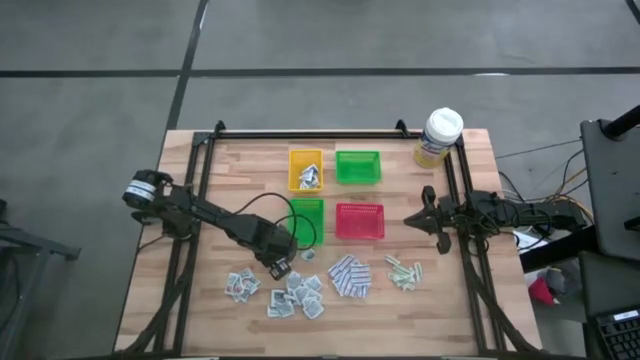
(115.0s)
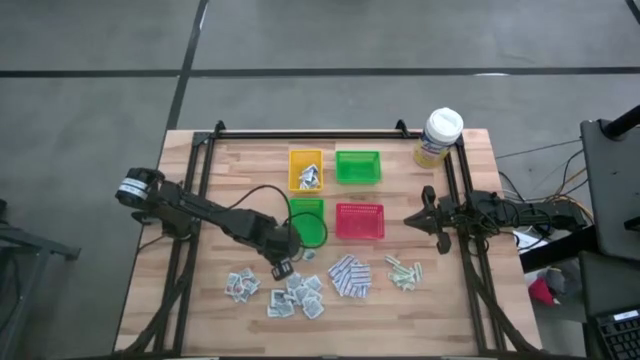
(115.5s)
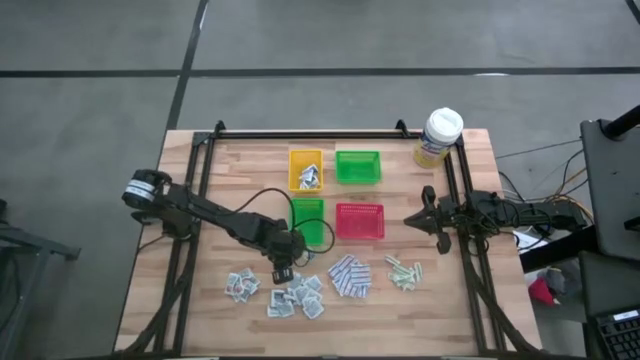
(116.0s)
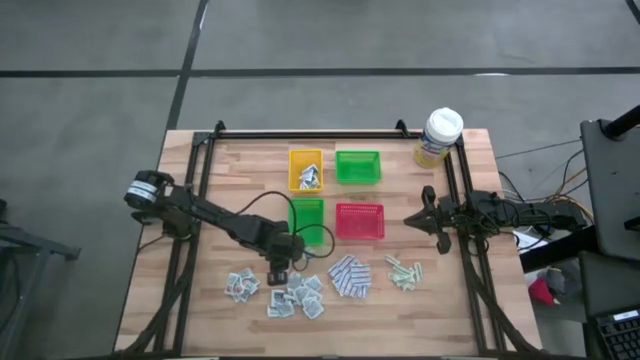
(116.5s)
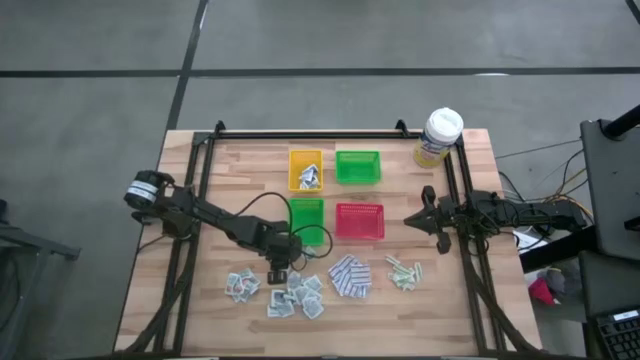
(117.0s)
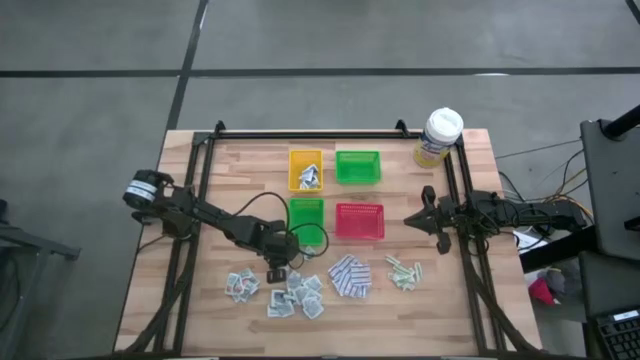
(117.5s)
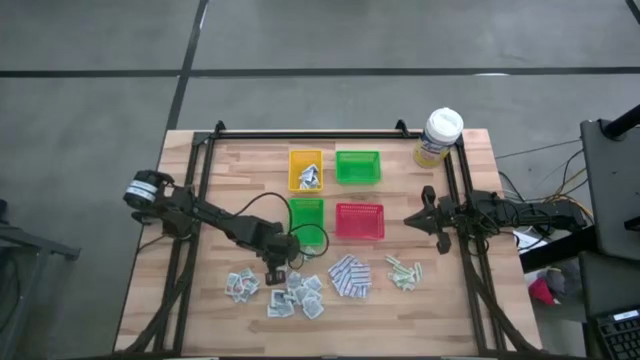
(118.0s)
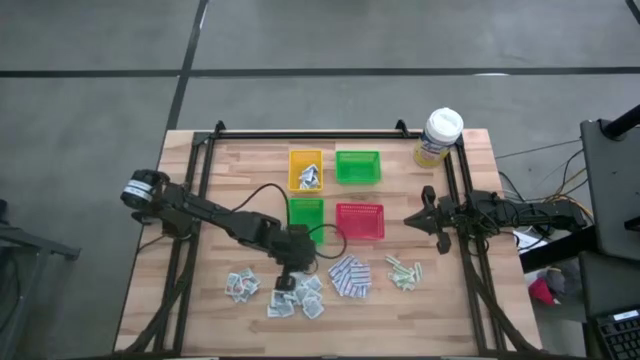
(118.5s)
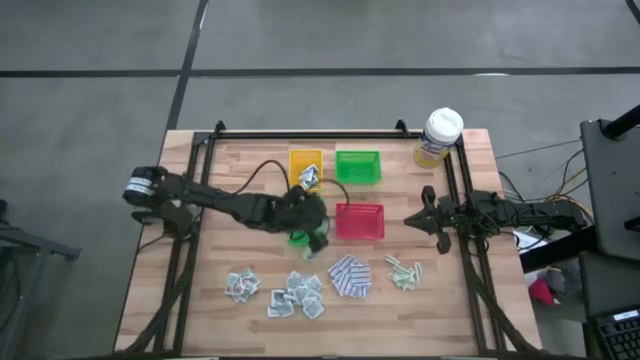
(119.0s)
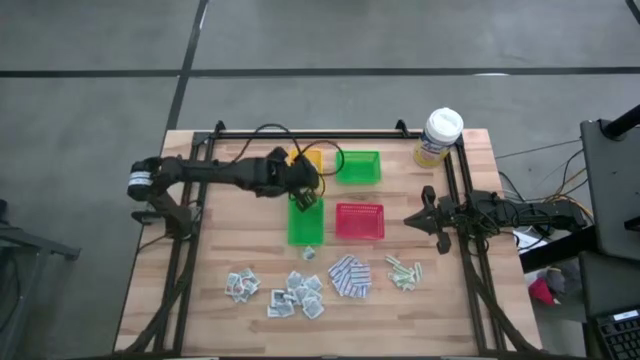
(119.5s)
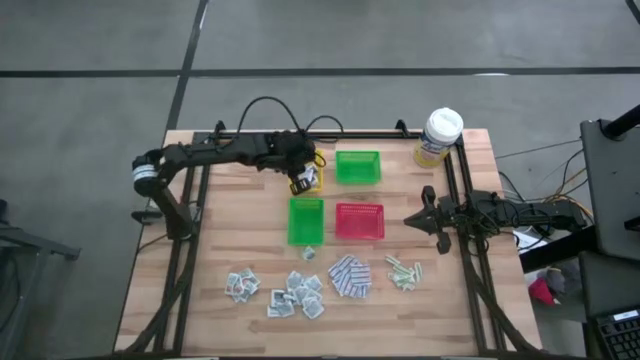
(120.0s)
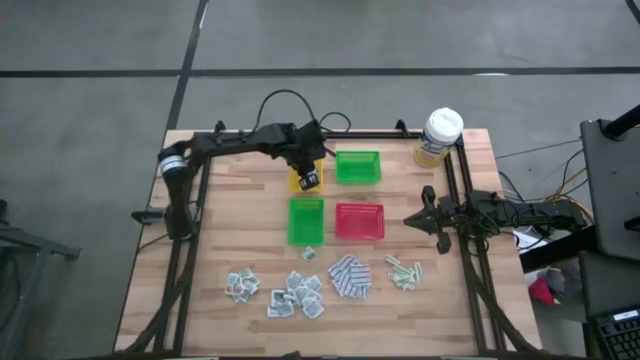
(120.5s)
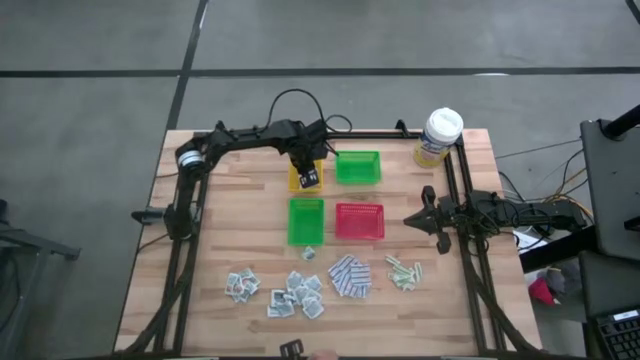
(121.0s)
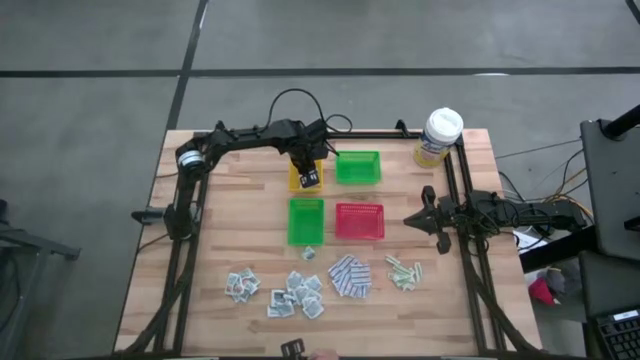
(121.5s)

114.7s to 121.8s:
Task: Pick & Place First Aid Supplies
Put the blue alcohol pad into the yellow bin

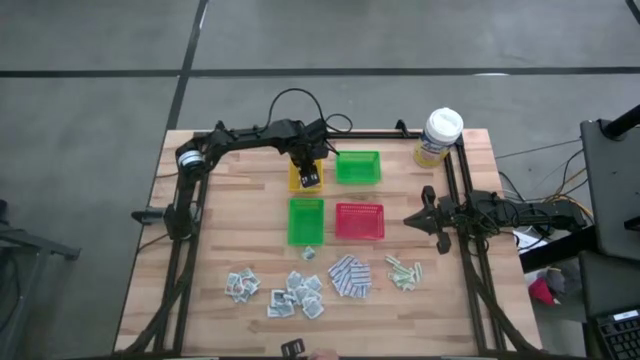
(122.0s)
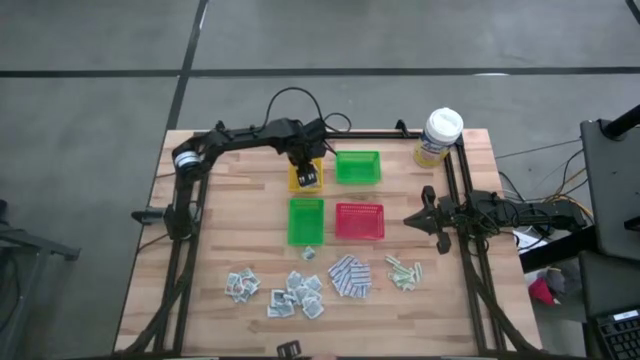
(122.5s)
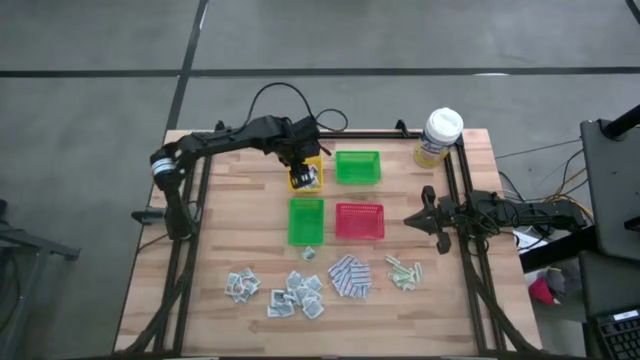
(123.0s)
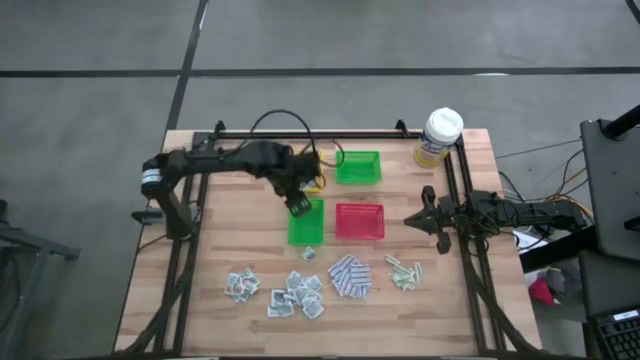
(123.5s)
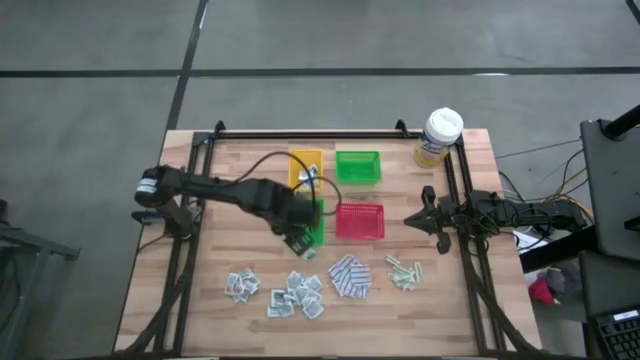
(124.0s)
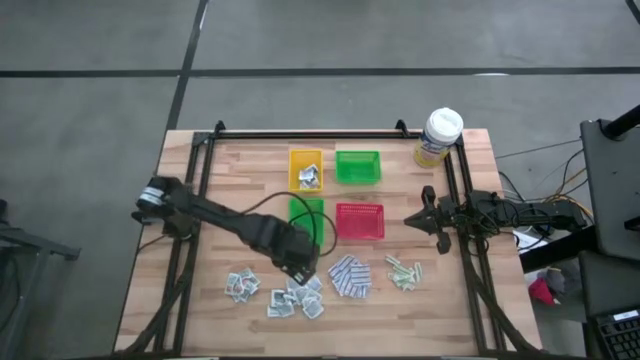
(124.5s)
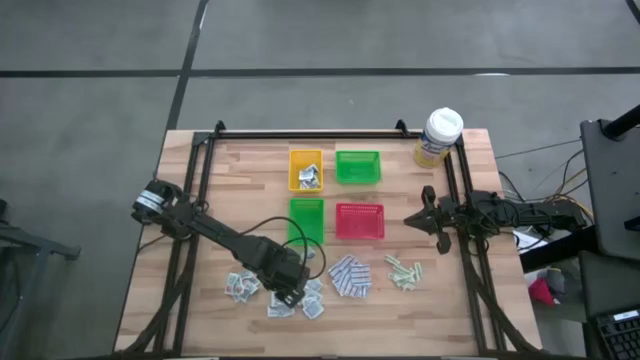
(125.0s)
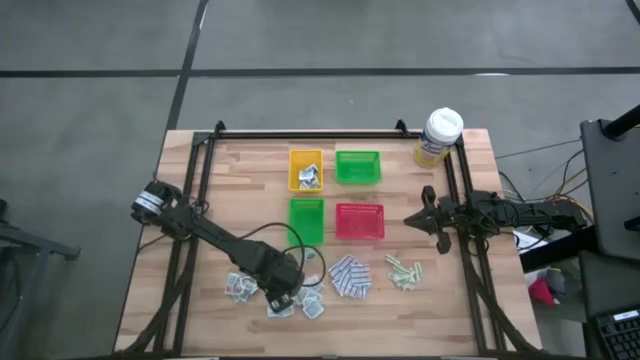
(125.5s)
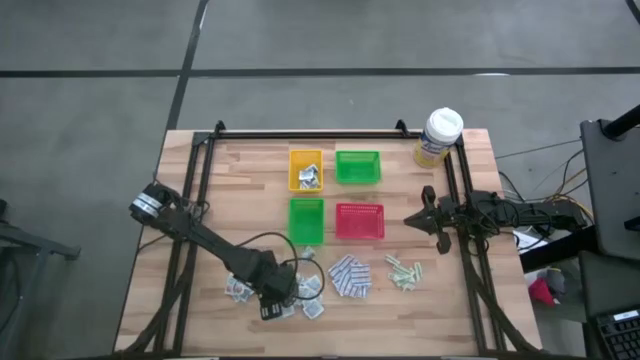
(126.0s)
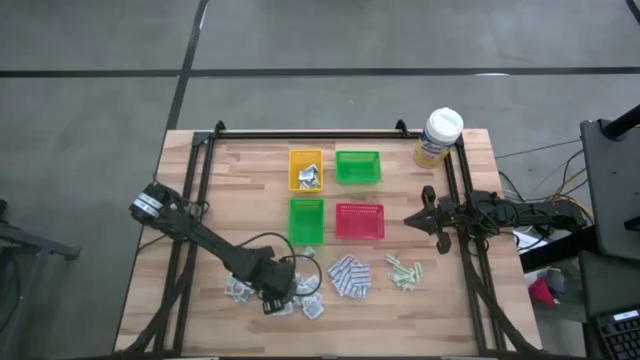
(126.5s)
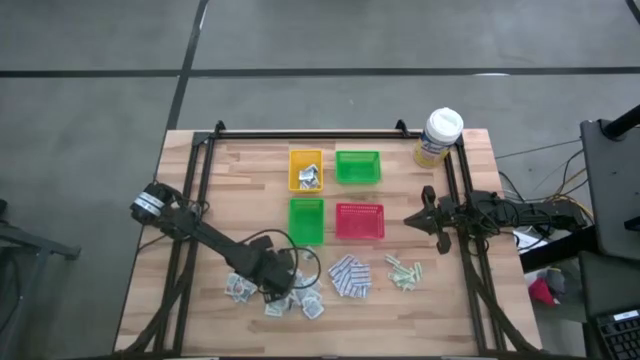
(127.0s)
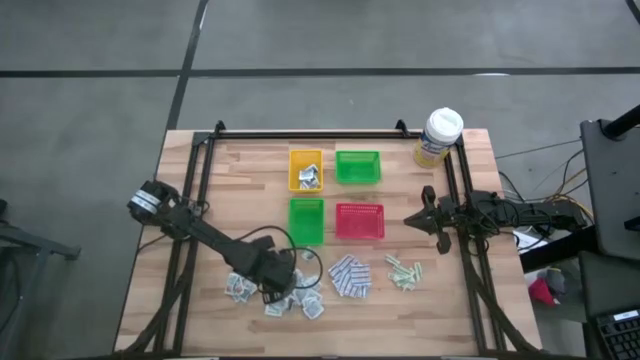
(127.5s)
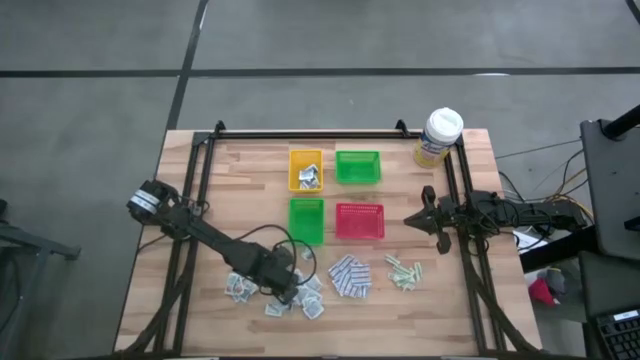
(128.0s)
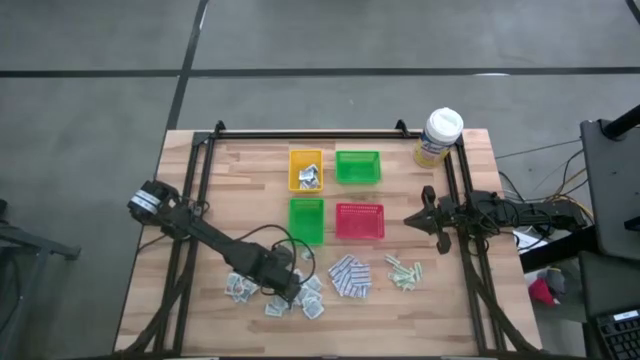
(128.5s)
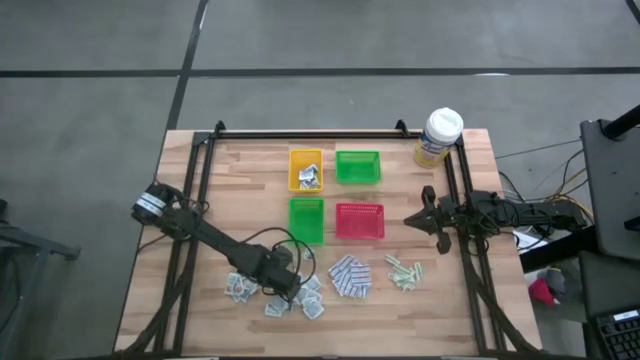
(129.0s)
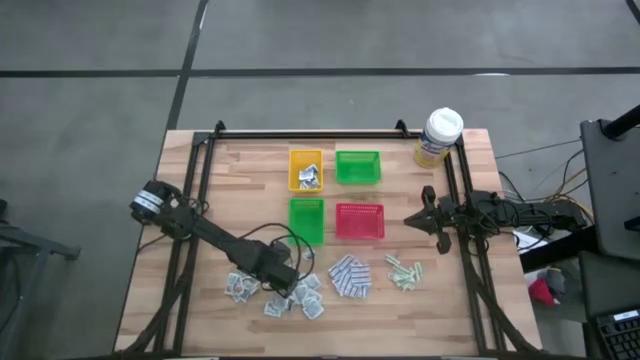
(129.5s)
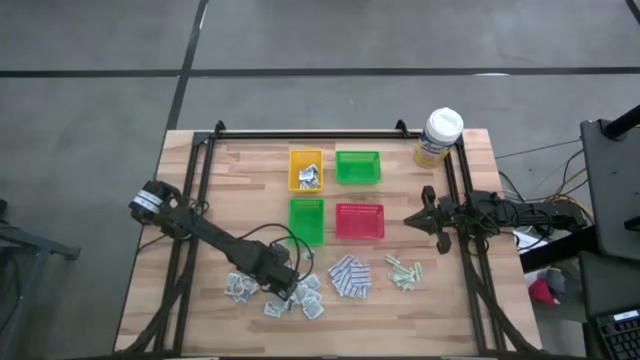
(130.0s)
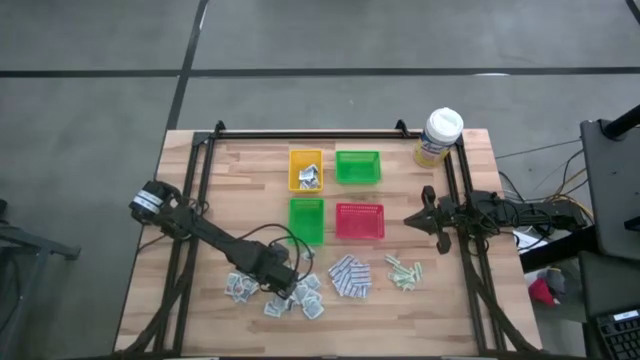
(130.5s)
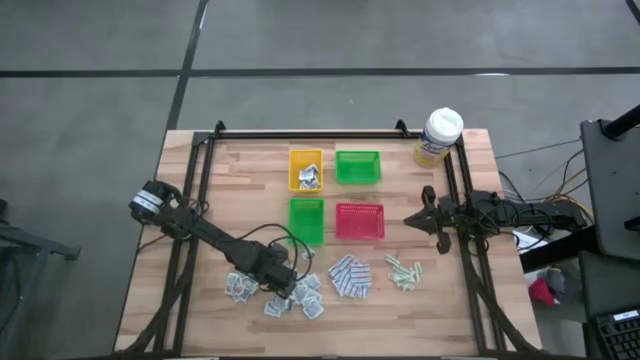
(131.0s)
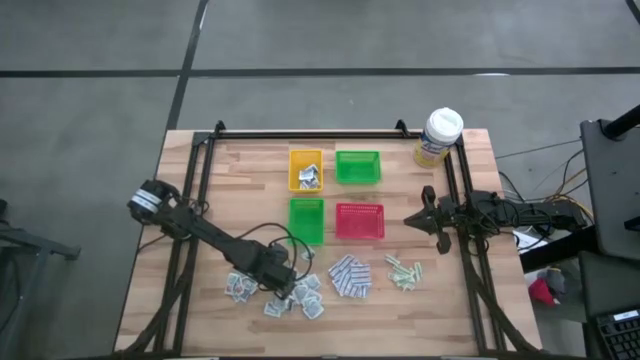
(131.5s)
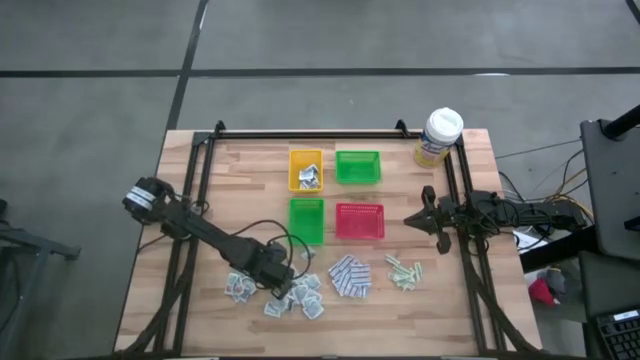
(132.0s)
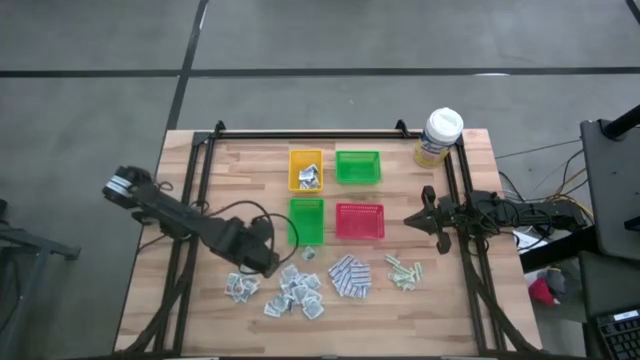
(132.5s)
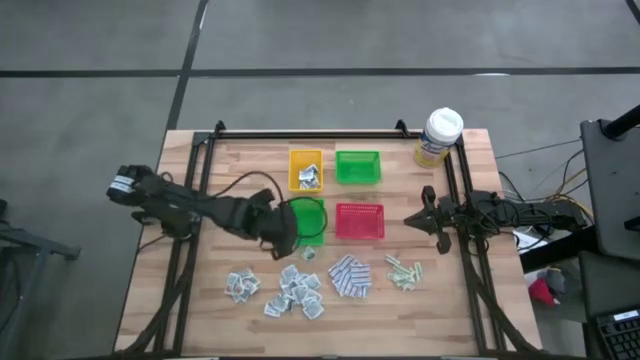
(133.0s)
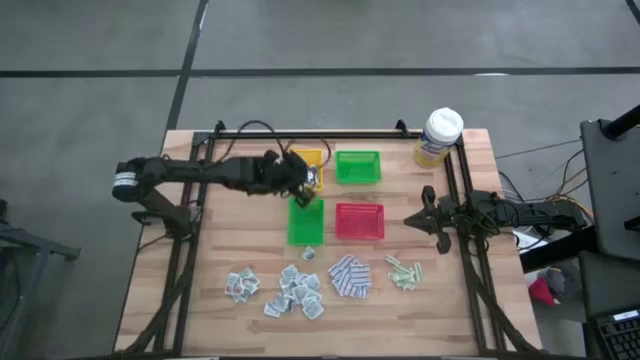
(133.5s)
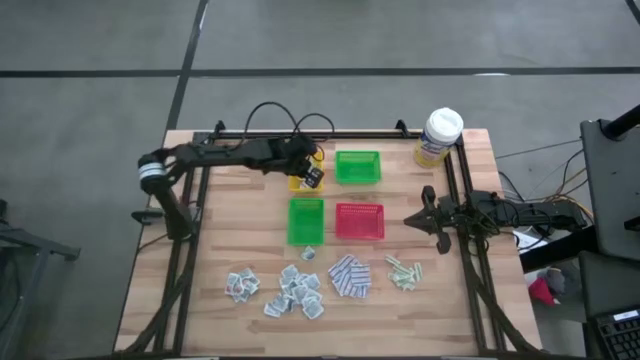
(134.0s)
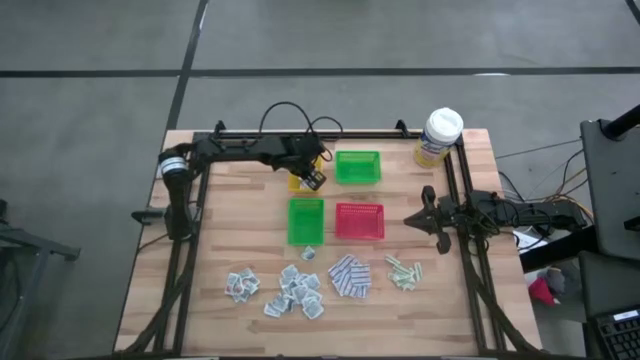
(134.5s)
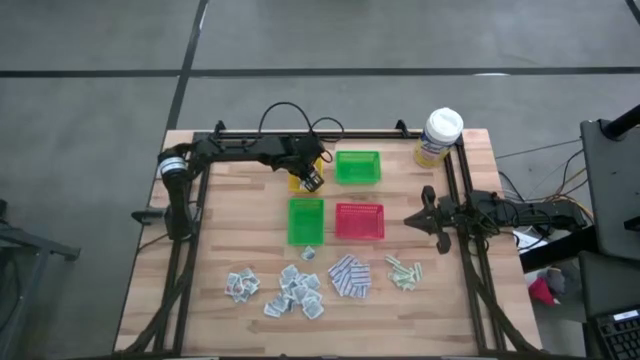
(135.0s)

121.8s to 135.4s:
Put the blue alcohol pad into the yellow bin

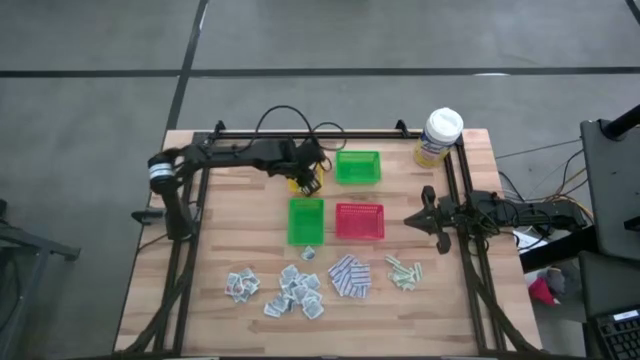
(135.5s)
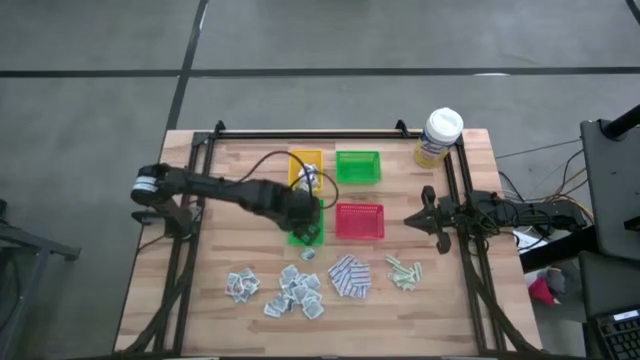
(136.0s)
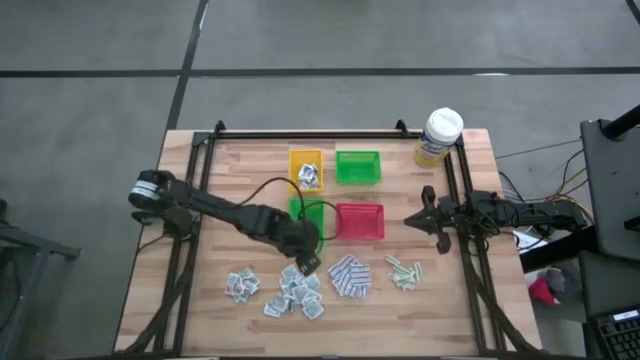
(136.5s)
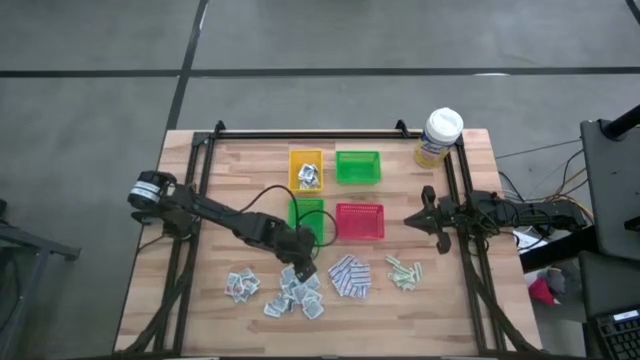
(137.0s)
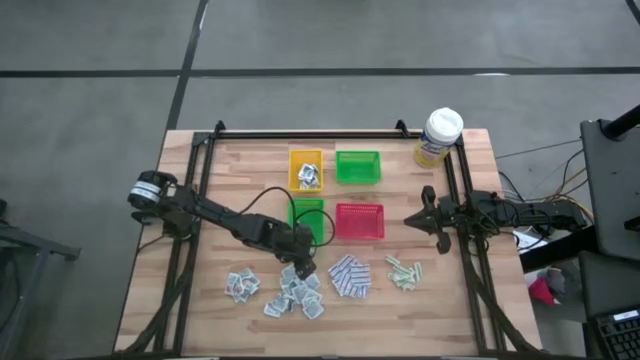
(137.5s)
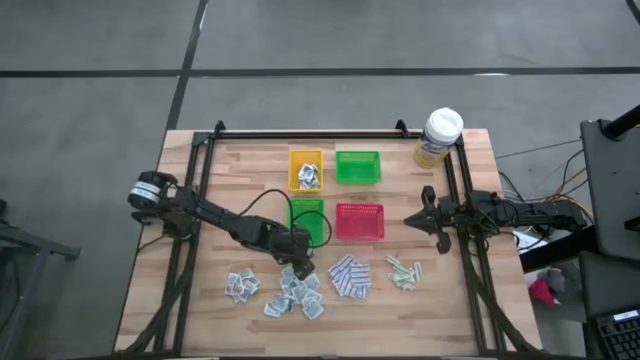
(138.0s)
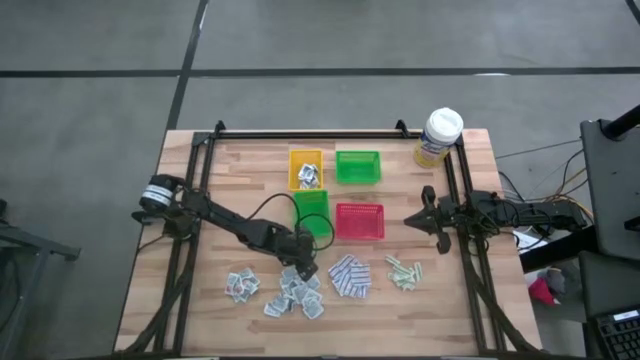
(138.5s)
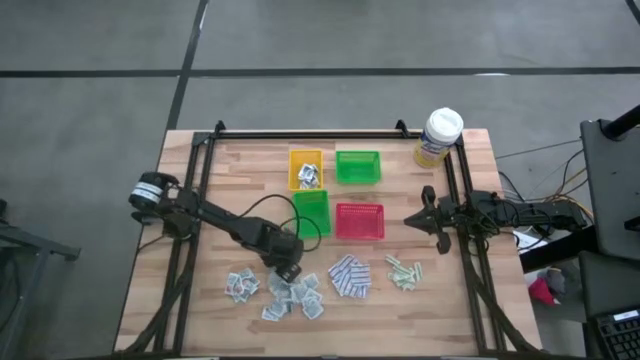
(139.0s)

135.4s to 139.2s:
Adjust the blue alcohol pad on the table
